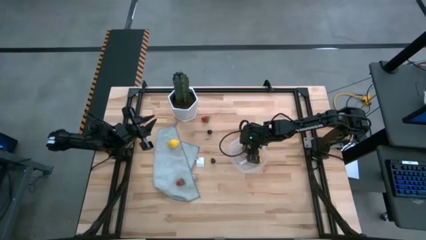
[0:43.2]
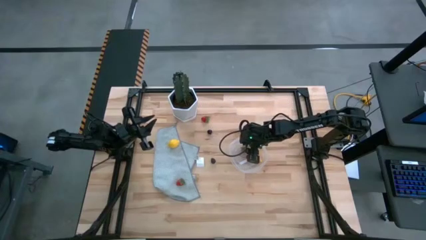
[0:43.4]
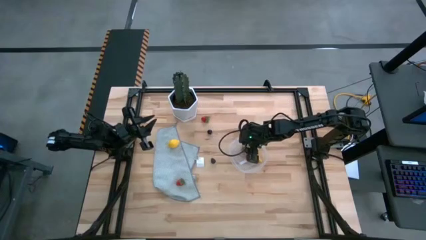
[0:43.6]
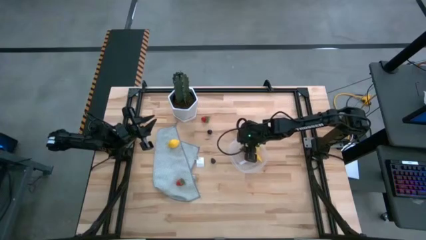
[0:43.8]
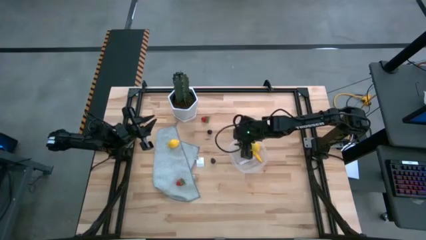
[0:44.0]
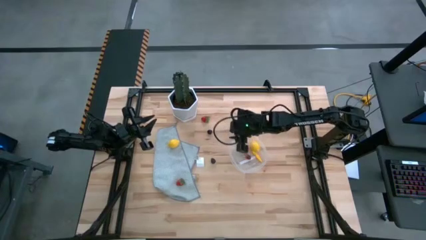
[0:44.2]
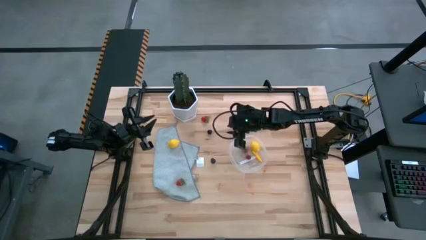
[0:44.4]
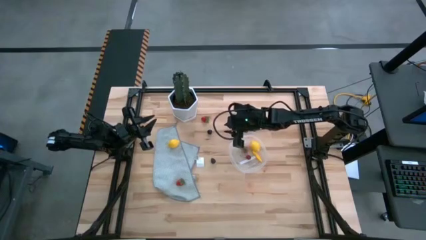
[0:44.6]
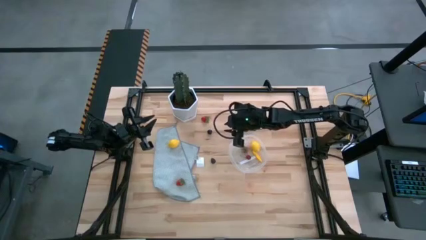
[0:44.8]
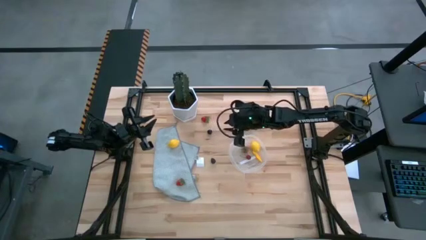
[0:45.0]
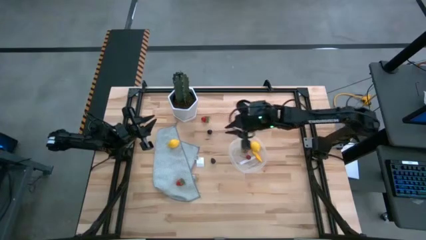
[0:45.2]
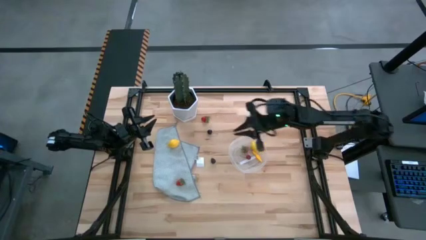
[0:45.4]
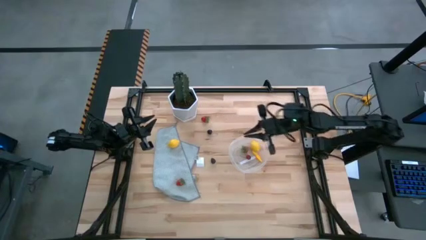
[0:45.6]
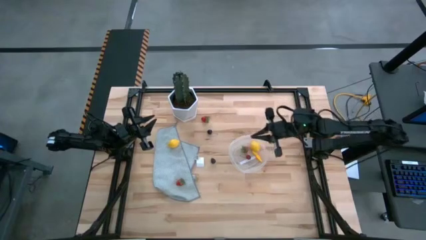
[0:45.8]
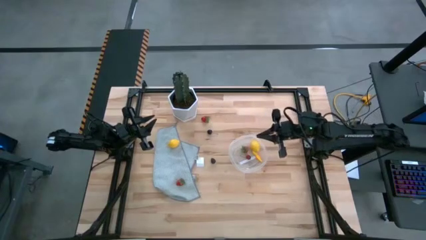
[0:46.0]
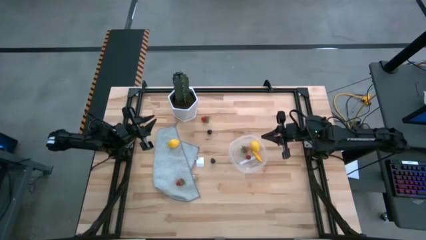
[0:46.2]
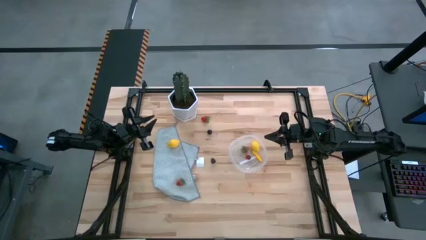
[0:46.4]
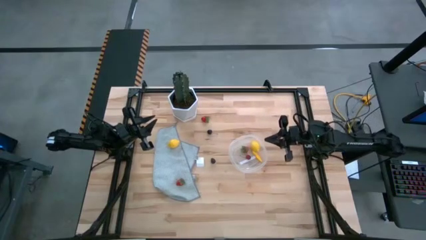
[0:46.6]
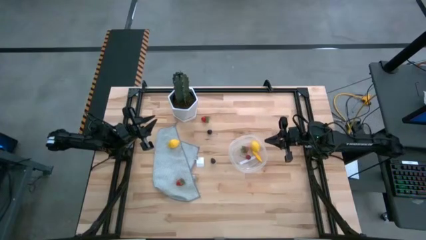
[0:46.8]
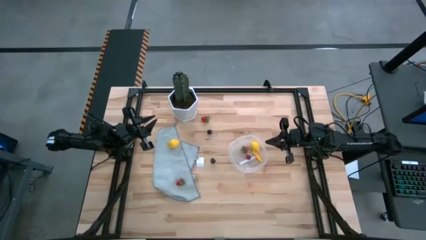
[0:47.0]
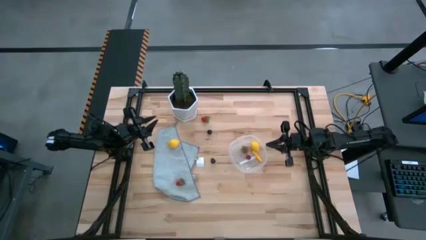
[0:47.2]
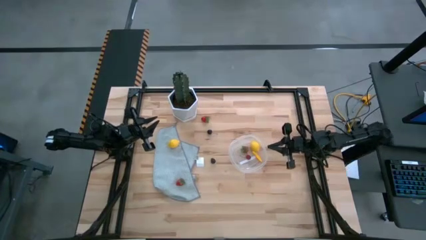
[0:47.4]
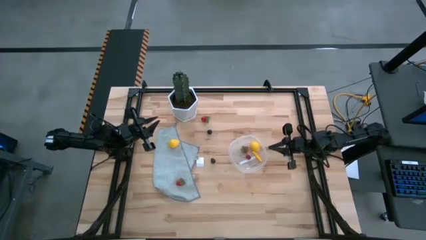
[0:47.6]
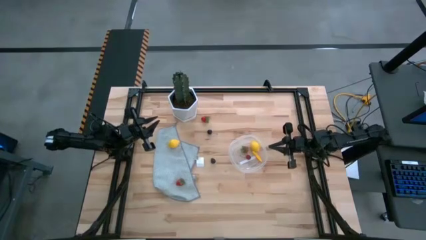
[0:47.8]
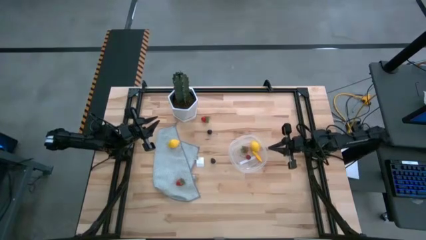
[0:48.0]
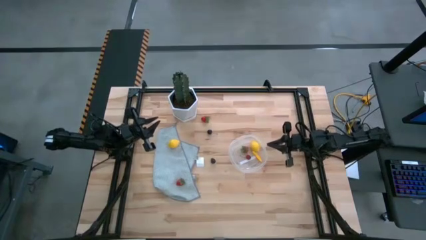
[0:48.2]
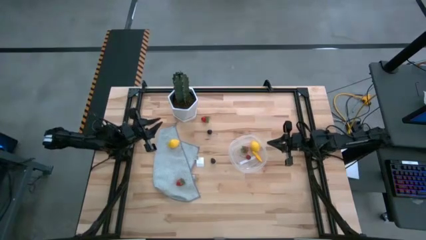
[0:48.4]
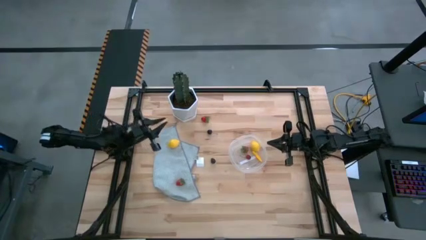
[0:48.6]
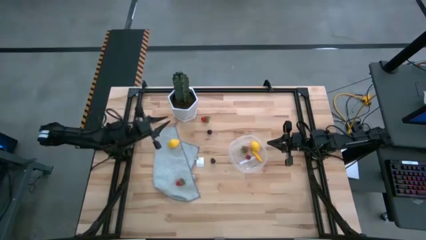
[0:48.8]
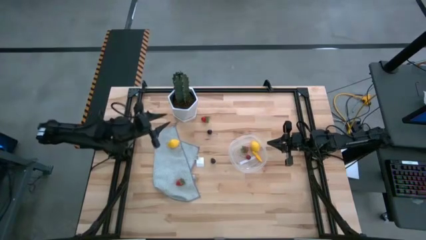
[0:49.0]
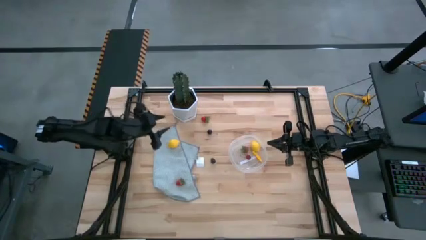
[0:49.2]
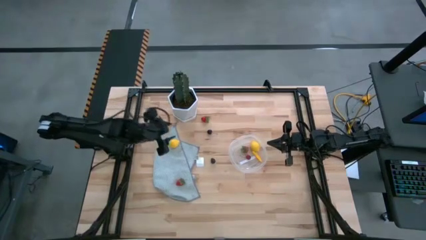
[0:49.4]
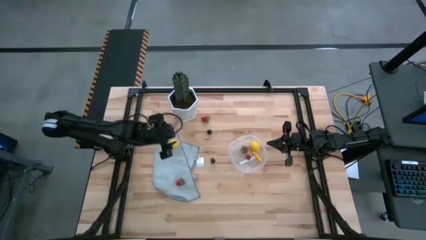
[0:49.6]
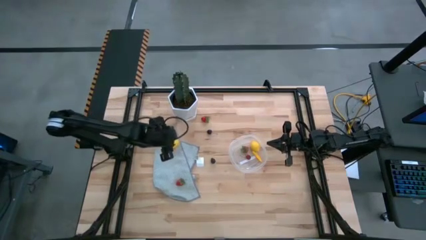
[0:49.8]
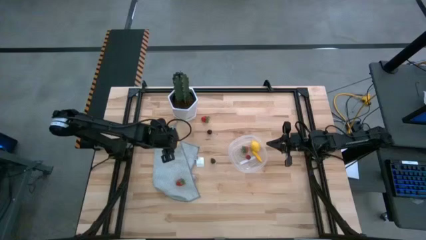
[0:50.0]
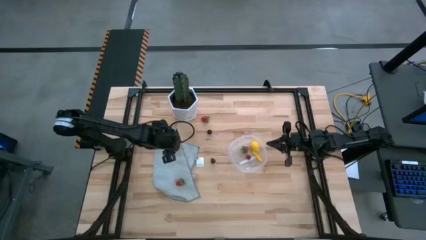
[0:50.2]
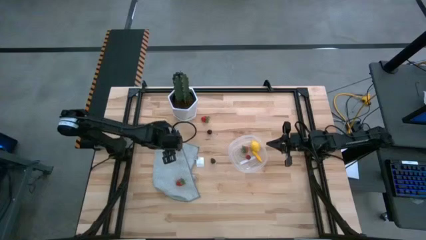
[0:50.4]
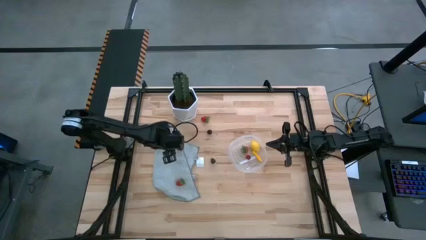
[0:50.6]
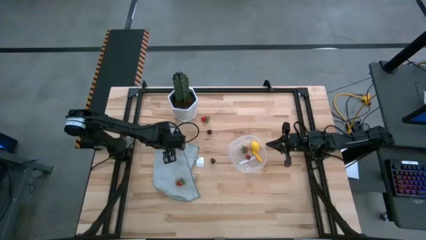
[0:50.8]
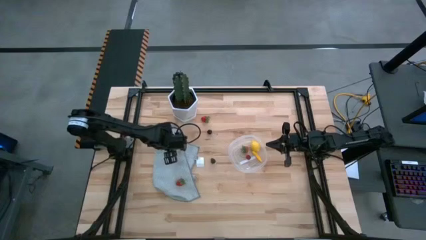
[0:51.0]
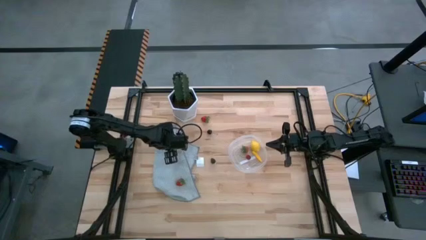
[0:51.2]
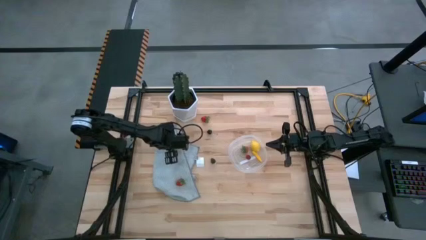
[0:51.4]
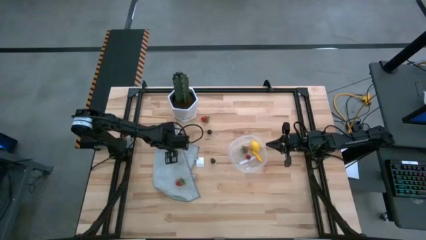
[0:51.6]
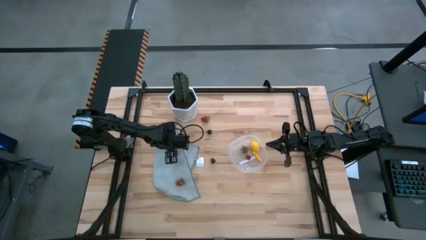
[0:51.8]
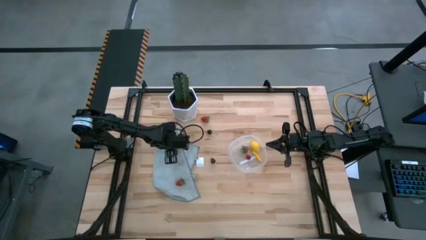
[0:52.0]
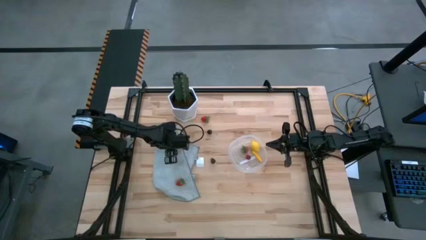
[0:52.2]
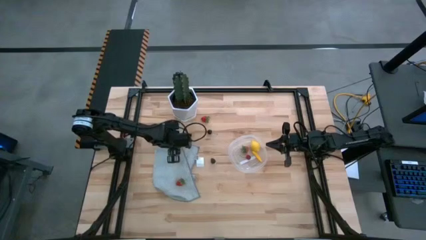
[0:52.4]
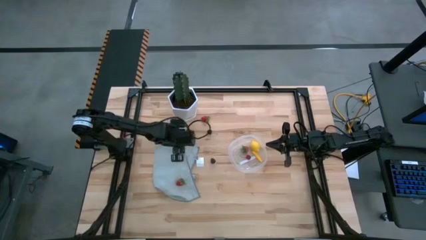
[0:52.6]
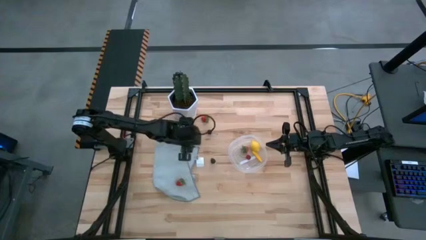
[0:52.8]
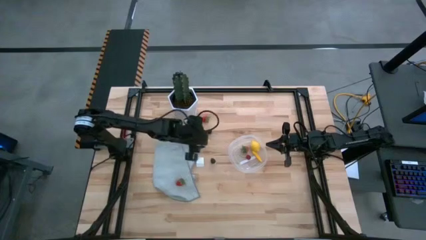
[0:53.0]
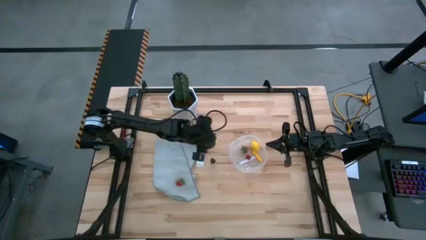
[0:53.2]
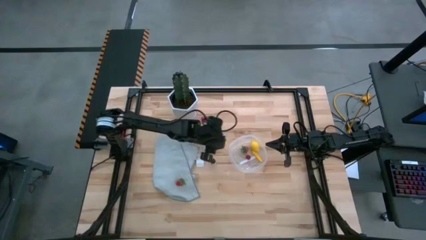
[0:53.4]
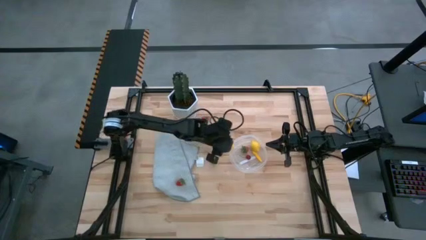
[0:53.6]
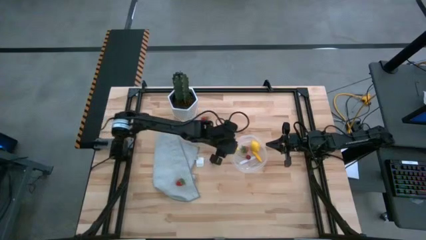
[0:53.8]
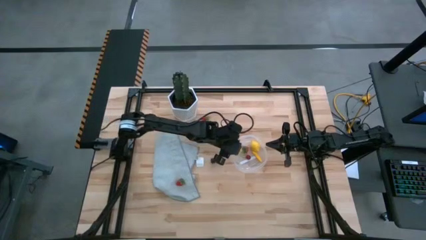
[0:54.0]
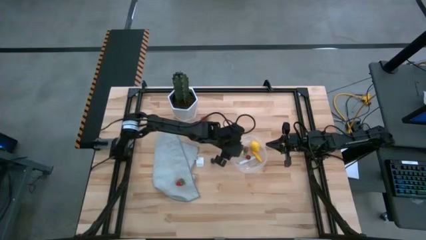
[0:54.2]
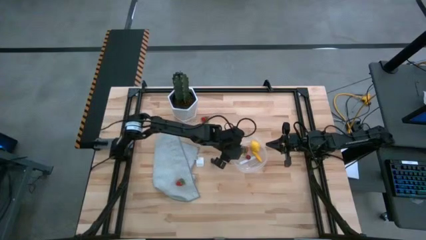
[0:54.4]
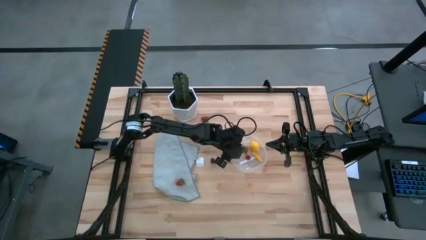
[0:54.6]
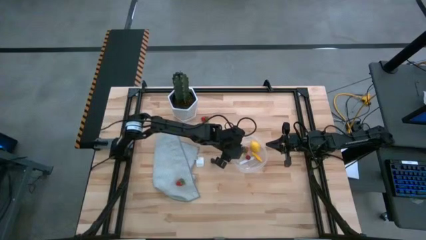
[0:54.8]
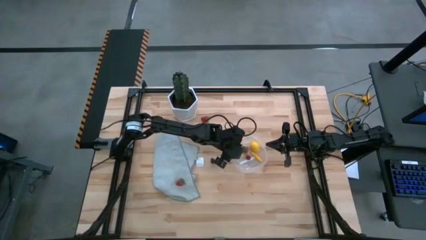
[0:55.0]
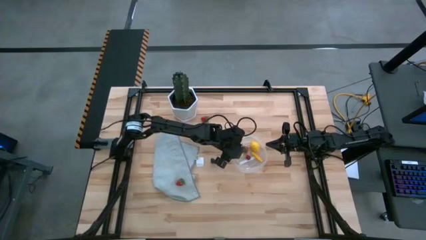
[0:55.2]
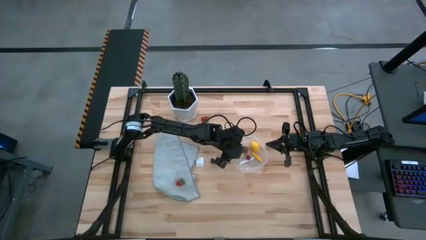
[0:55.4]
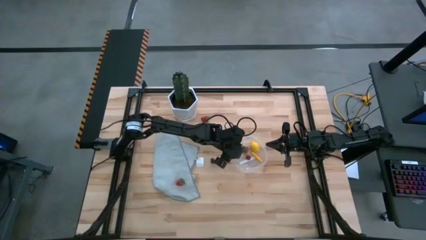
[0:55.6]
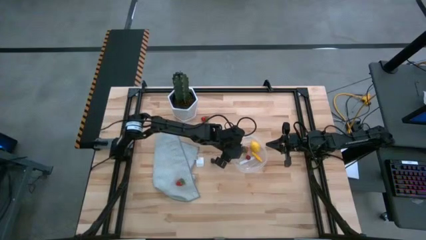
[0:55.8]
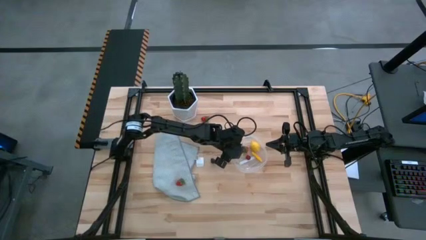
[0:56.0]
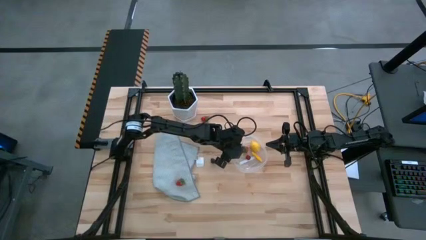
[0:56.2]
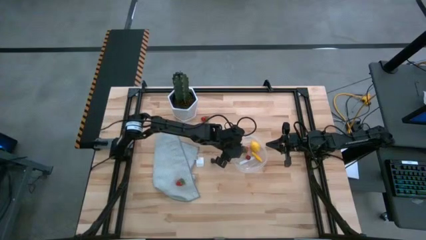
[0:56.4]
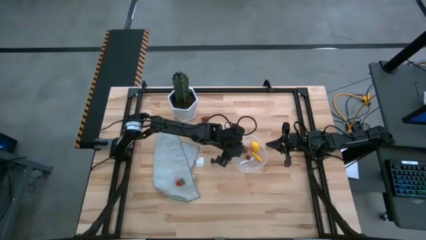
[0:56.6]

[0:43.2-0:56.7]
Task: Pick and placing Produce into tupperware
Put the yellow lemon into the transparent container

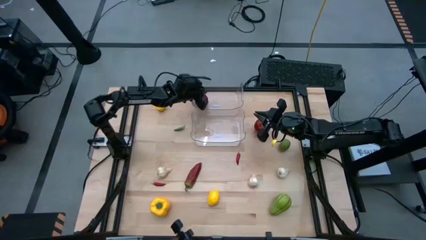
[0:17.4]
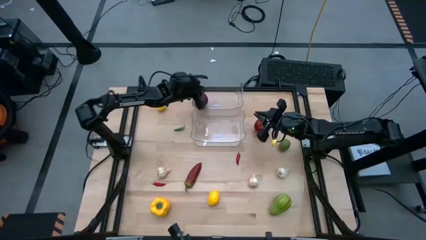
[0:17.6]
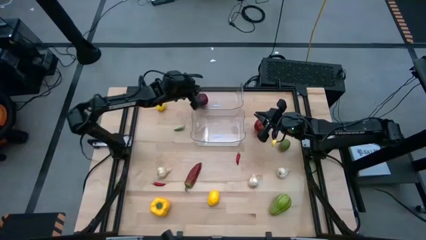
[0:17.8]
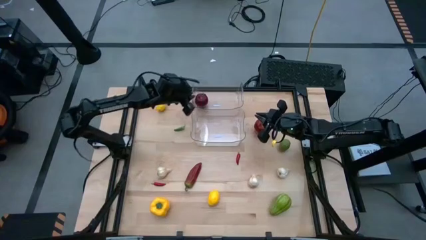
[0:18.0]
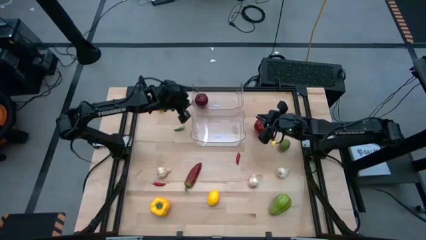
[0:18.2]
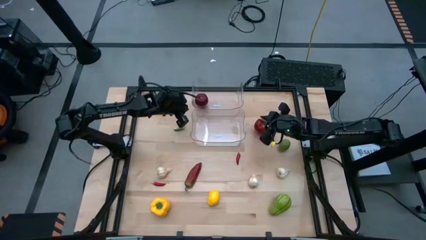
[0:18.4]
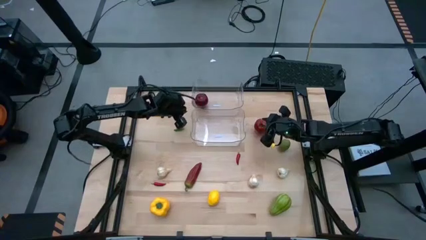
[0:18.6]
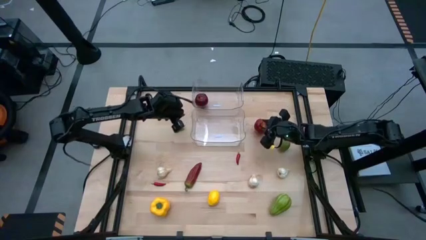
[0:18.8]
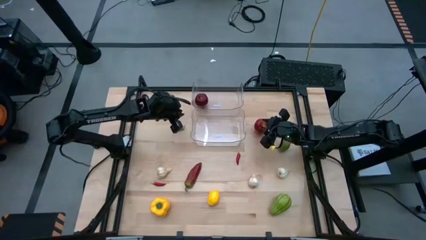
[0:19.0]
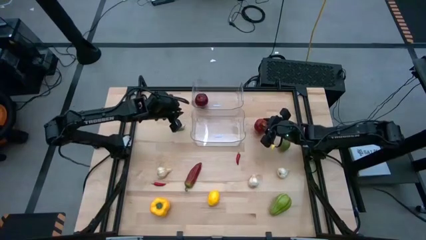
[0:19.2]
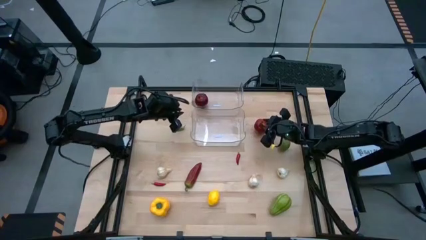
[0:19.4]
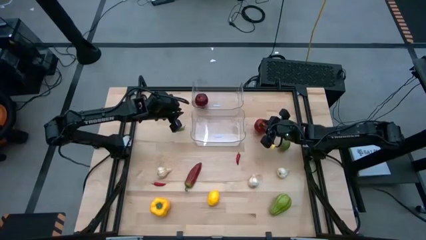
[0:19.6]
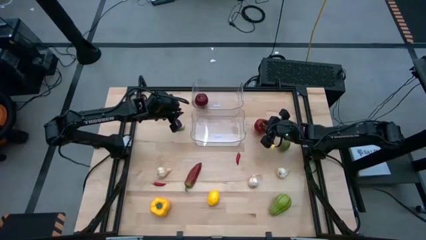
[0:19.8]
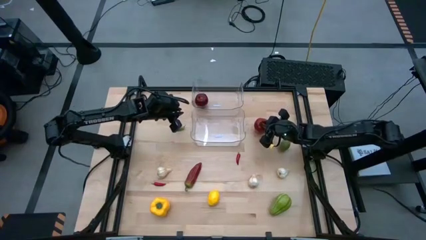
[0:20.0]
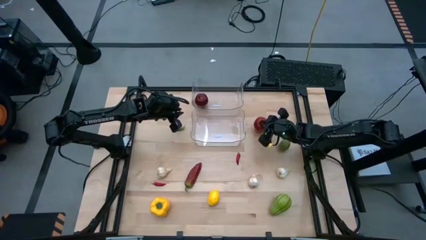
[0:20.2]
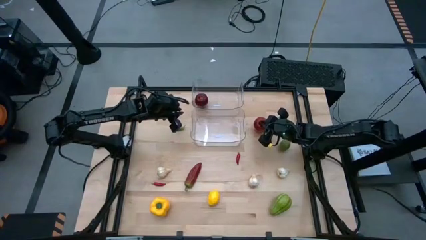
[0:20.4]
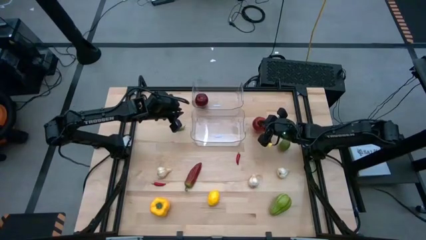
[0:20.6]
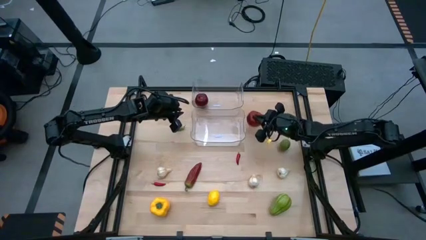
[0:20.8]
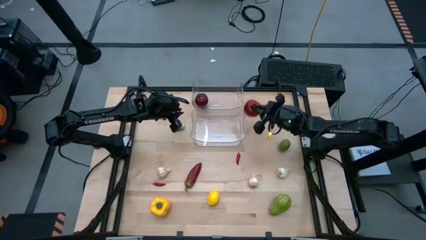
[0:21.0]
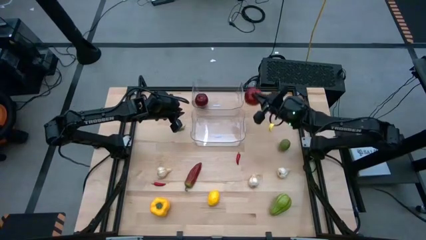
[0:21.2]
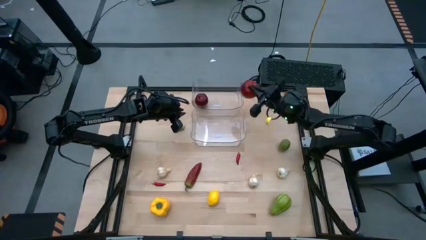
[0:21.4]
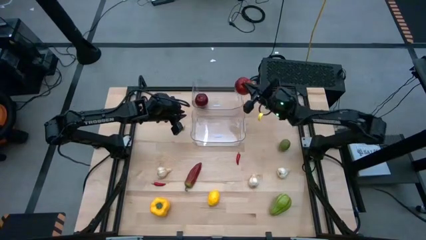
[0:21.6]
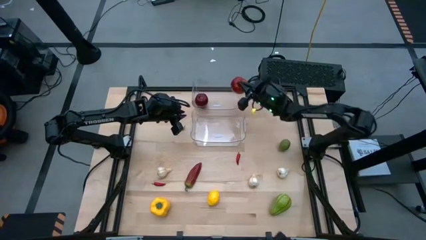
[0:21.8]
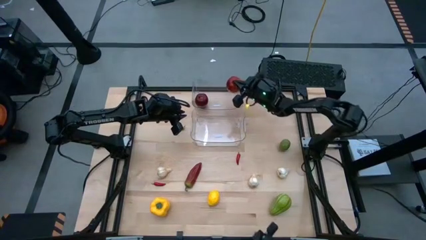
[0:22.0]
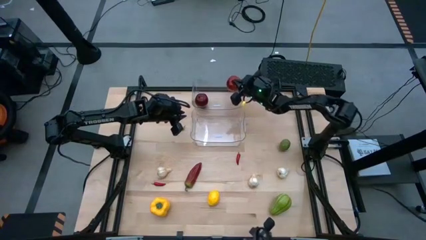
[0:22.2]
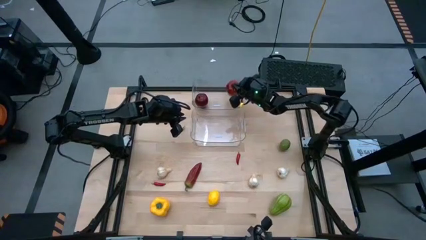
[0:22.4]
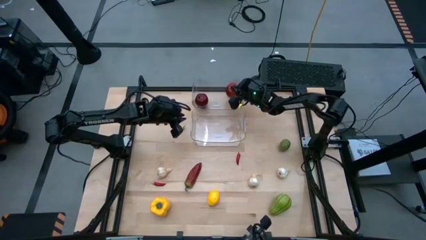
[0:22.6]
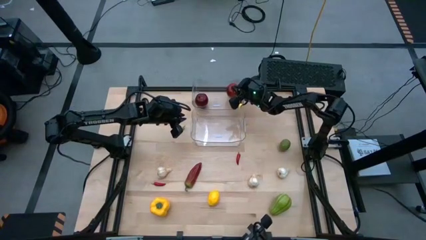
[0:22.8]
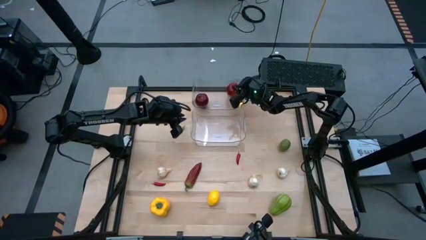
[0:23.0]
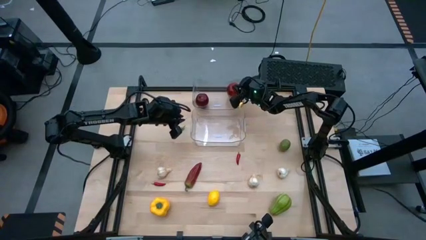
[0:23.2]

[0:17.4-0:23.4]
Task: Sort produce into baskets
Put the red apple into the top transparent bin
